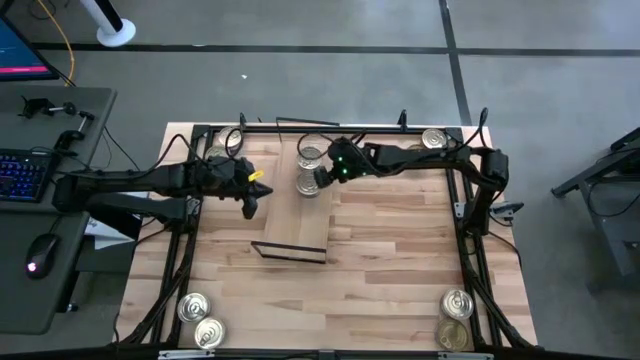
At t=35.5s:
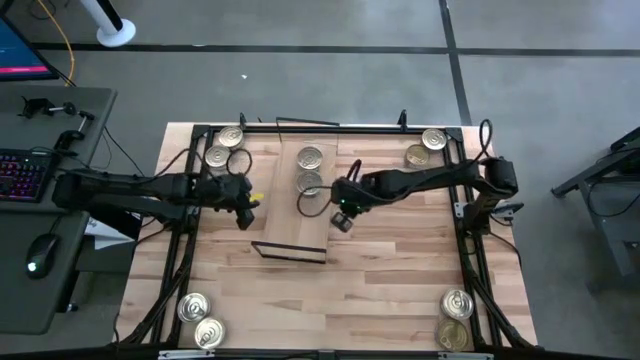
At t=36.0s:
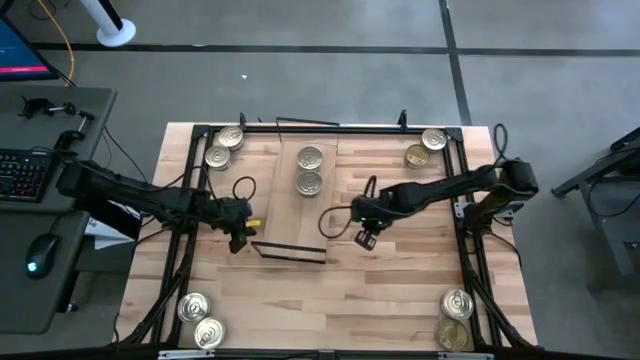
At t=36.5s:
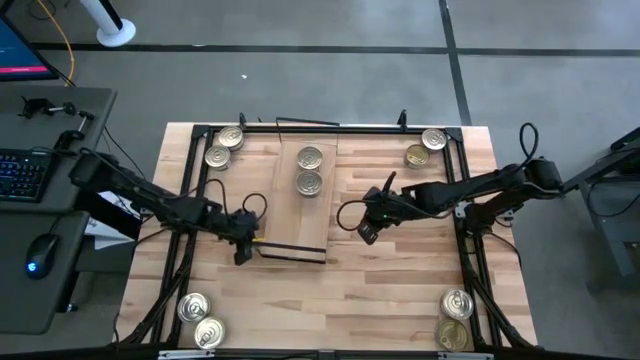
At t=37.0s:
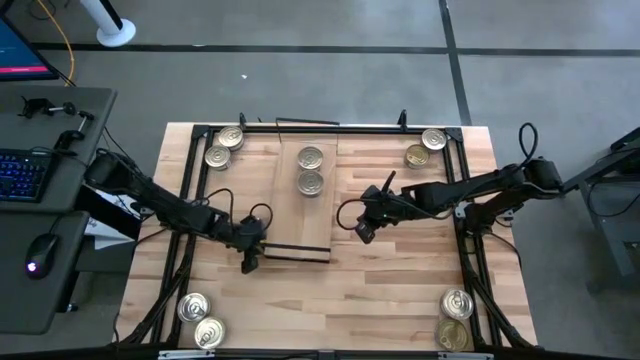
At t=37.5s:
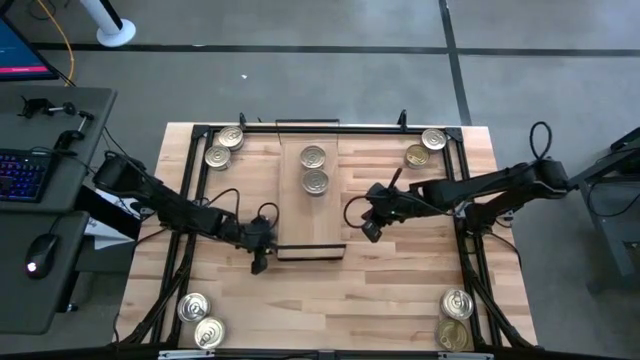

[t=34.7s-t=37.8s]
Task: Stack canned seafood by type on shelf
Adjust the shelf

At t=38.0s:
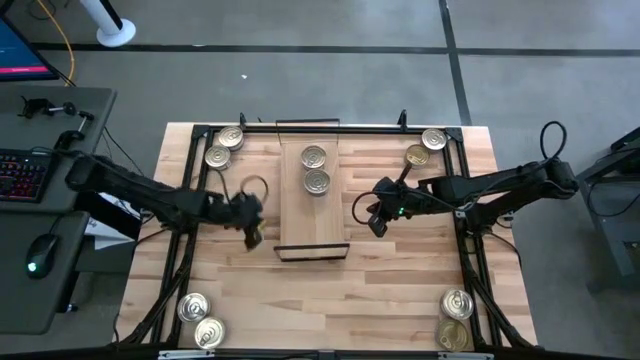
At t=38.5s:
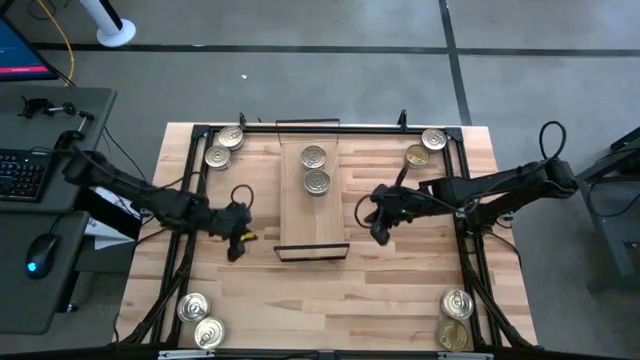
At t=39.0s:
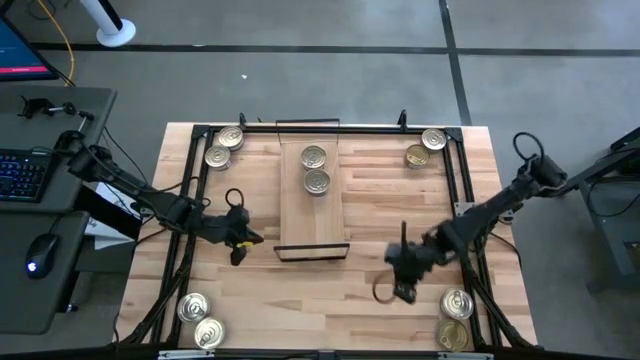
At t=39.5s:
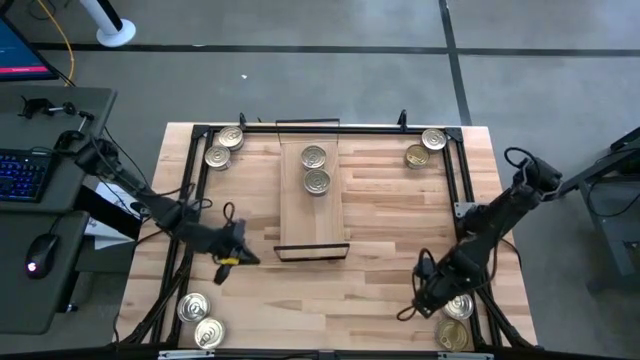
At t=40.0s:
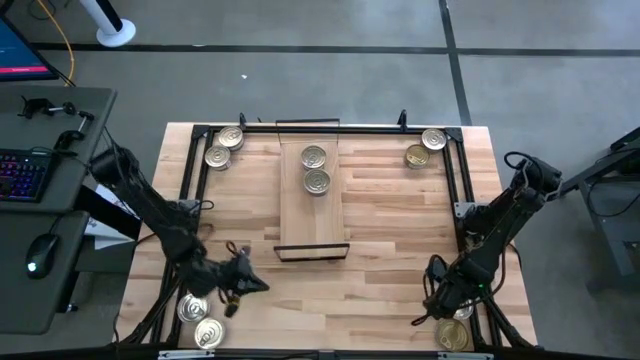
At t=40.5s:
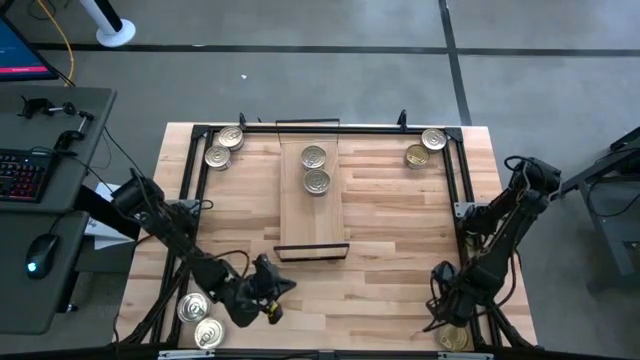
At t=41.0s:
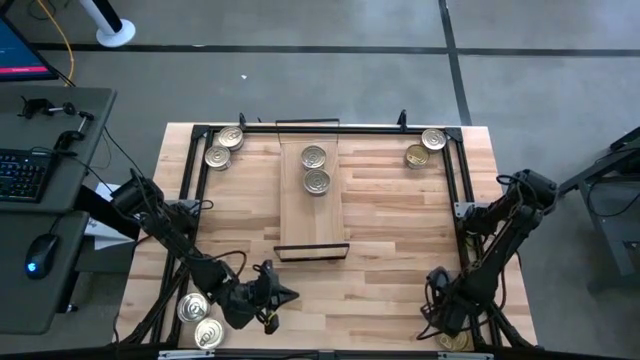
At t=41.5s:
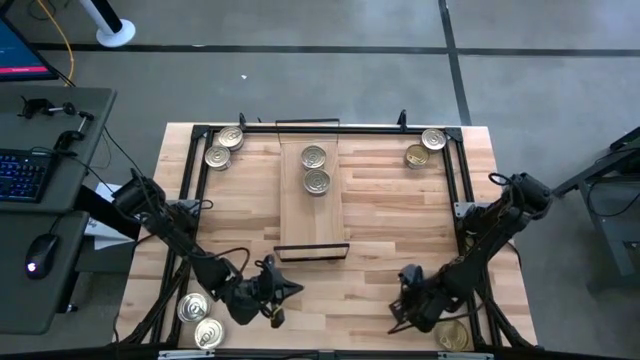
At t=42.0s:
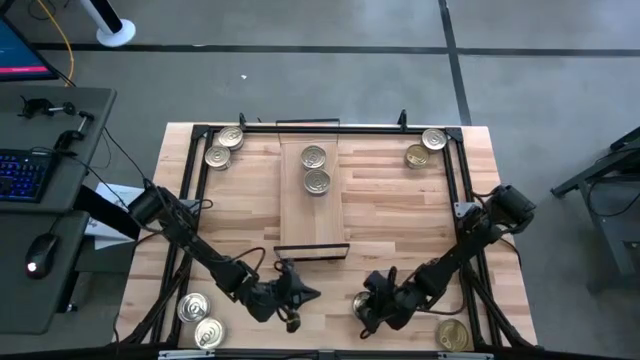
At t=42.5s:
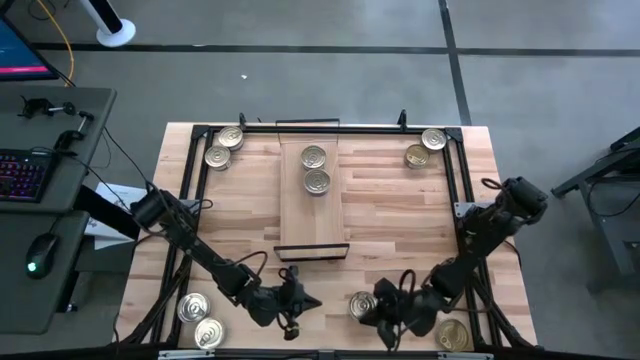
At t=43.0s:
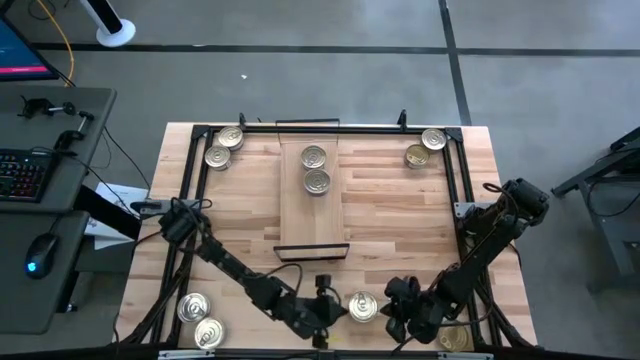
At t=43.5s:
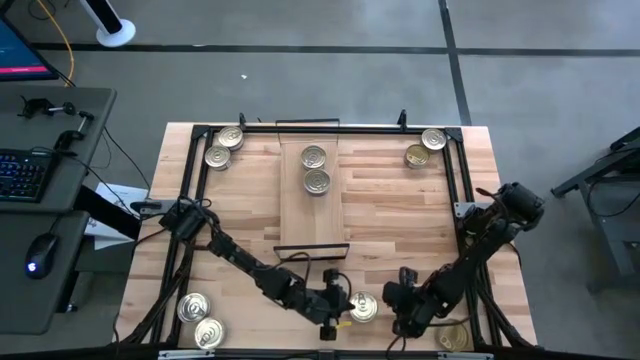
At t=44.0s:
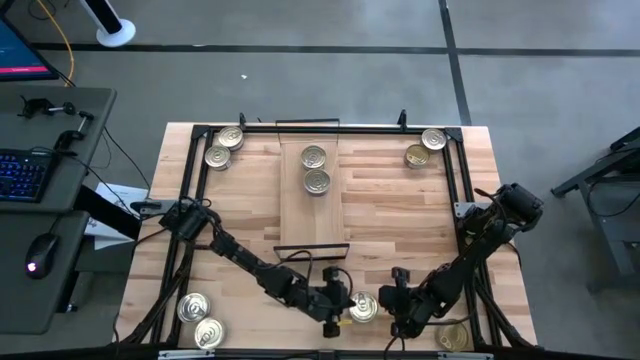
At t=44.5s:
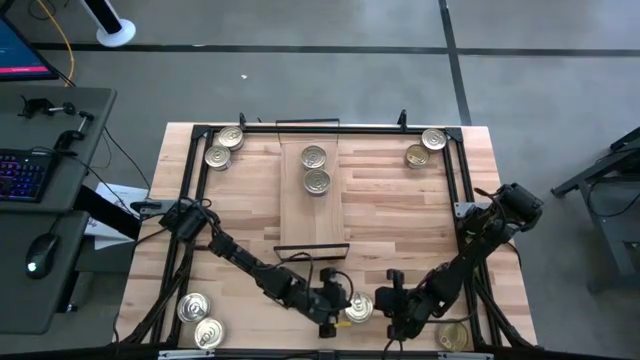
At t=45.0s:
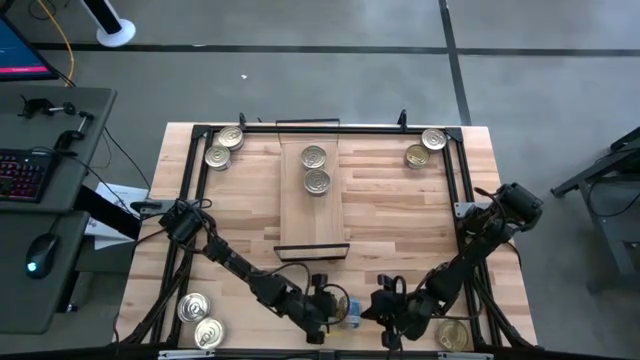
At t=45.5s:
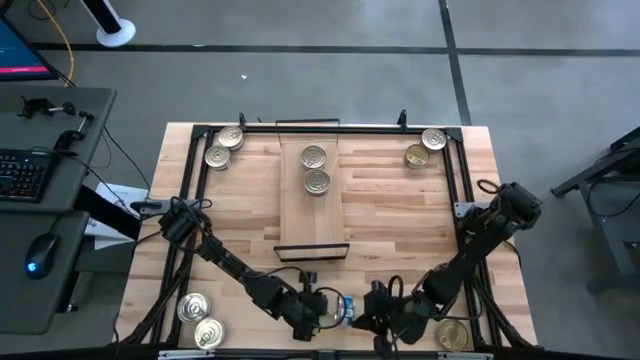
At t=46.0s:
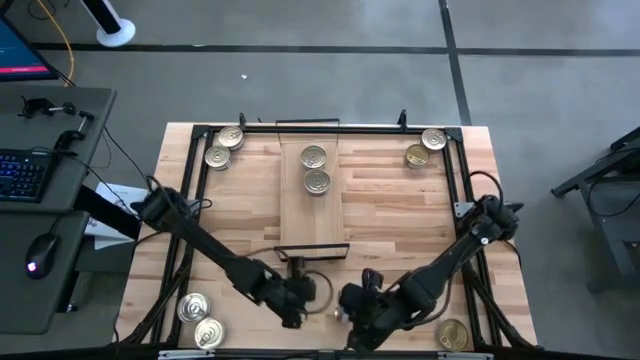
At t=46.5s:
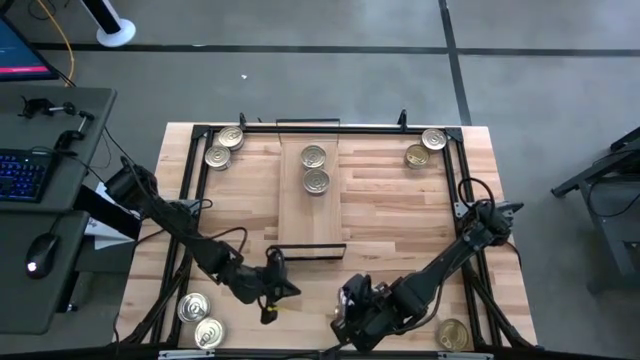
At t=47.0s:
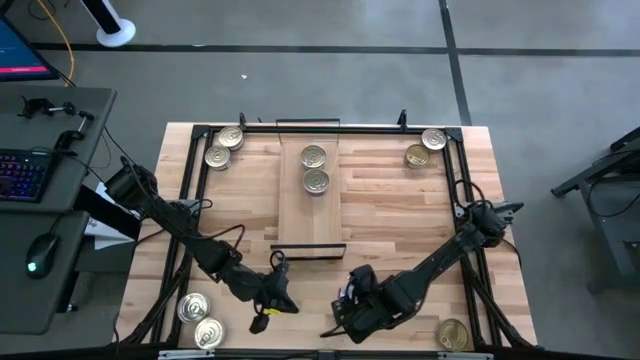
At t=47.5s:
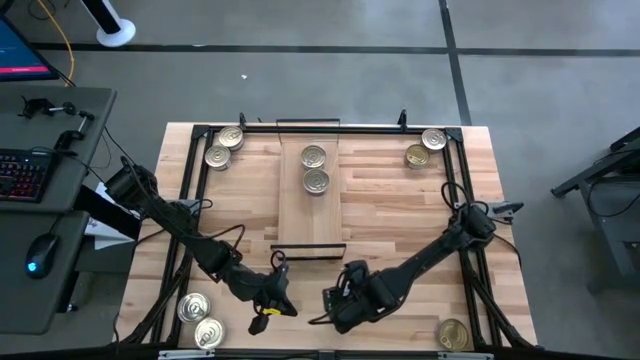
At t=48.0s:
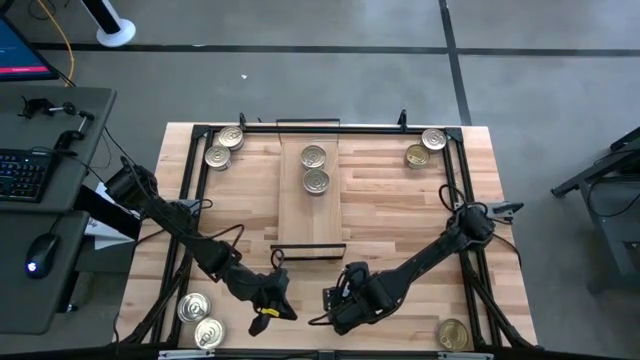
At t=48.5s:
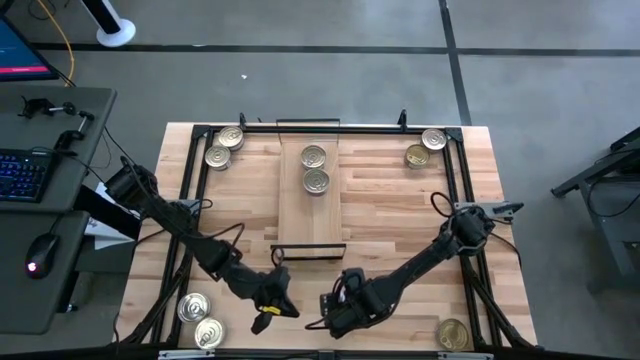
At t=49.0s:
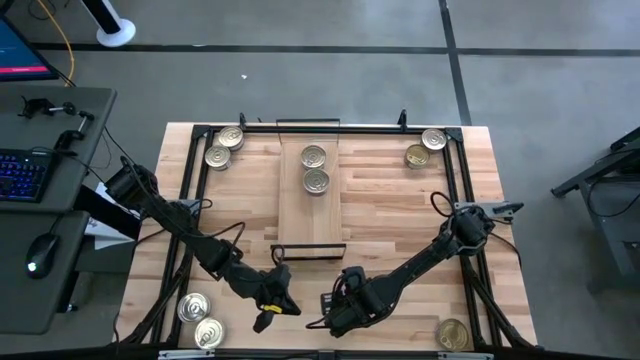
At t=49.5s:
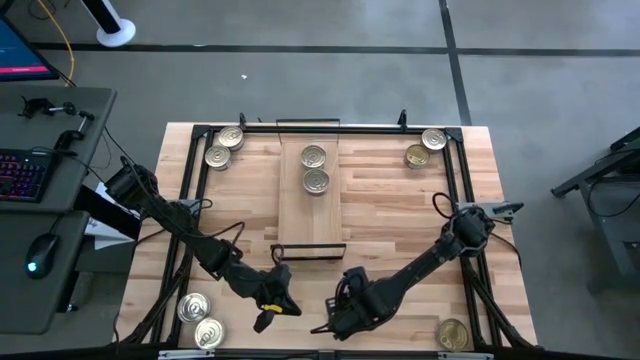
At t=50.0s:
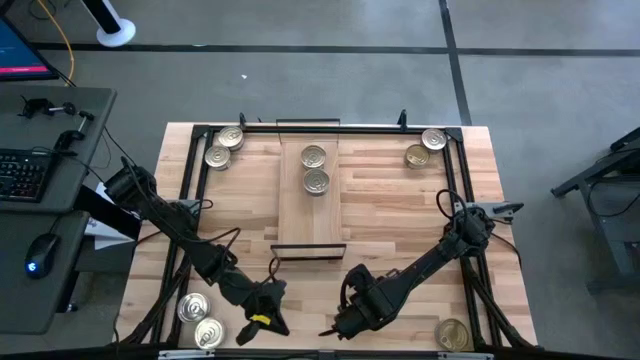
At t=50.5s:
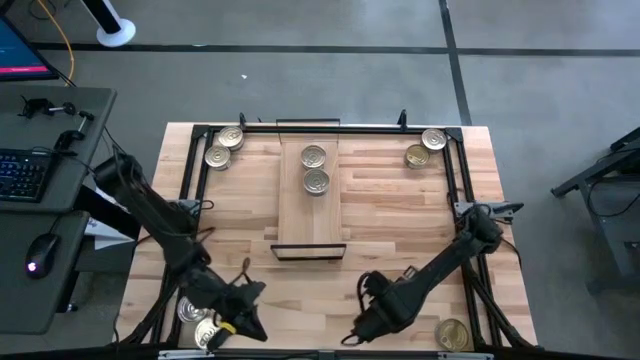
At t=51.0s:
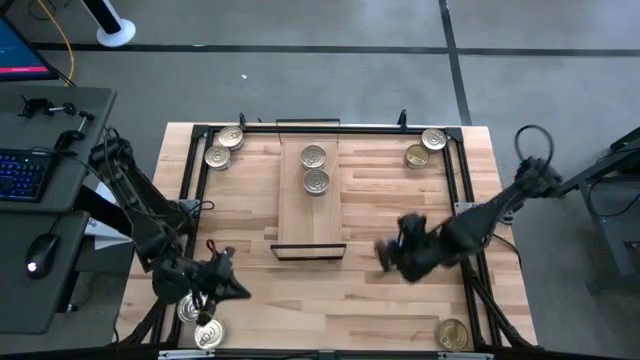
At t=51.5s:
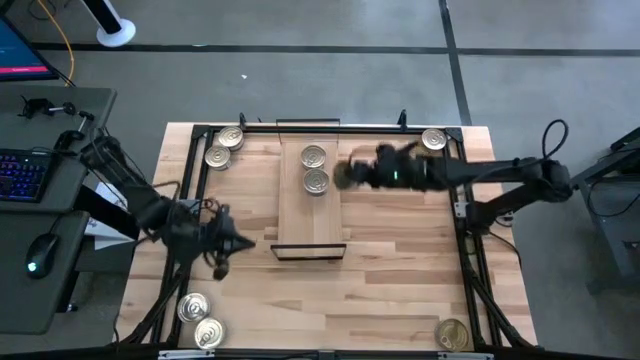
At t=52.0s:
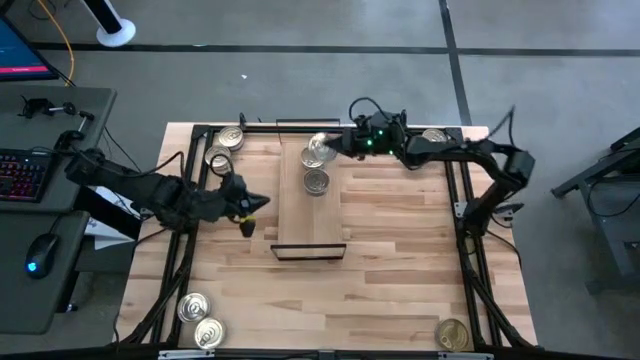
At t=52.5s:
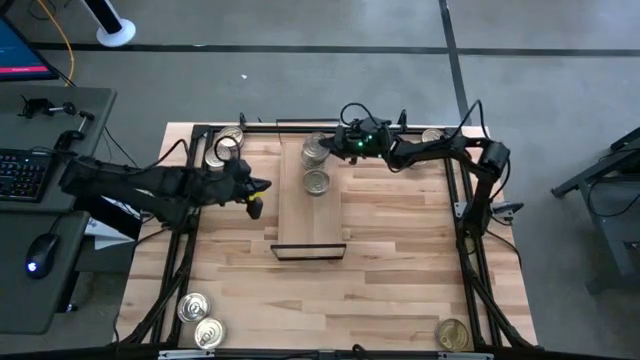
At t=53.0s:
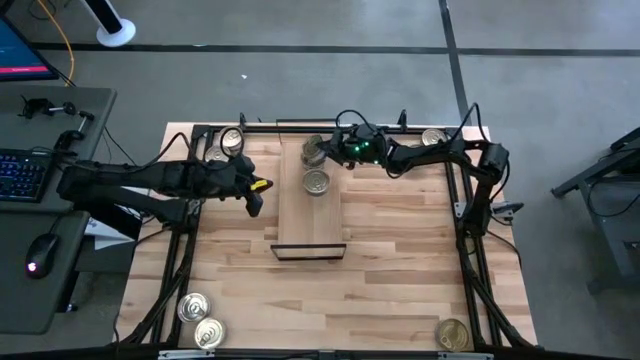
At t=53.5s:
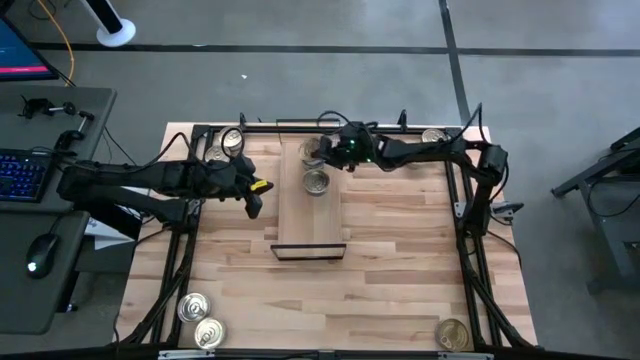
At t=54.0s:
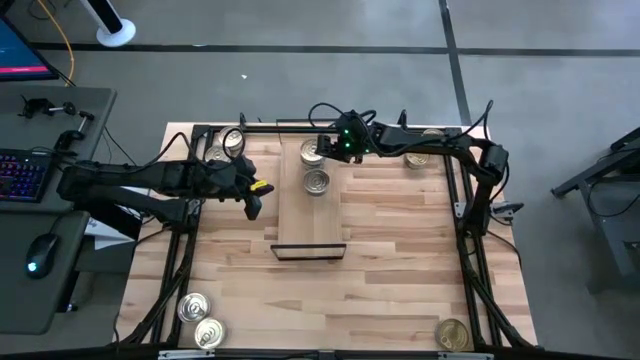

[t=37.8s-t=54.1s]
Stack the blue pink tuna can on top of the other blue pink tuna can on the shelf

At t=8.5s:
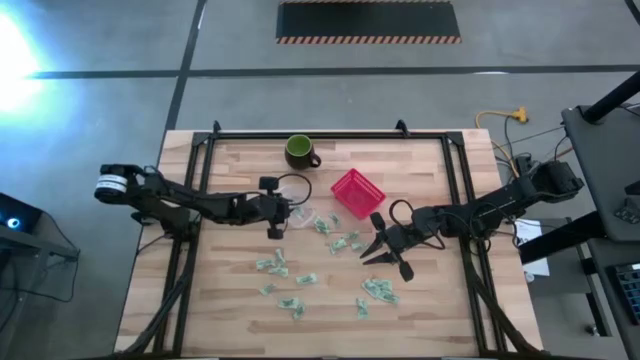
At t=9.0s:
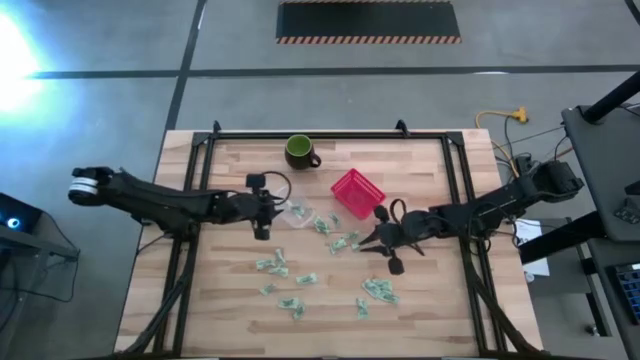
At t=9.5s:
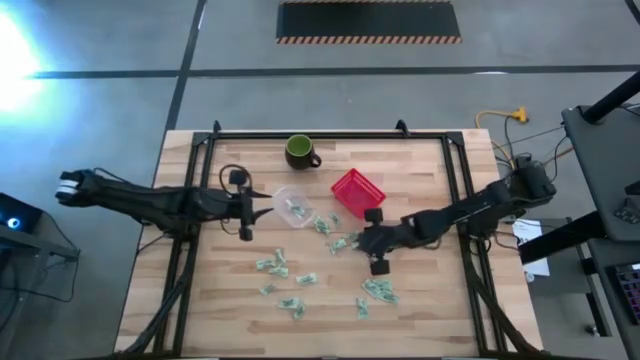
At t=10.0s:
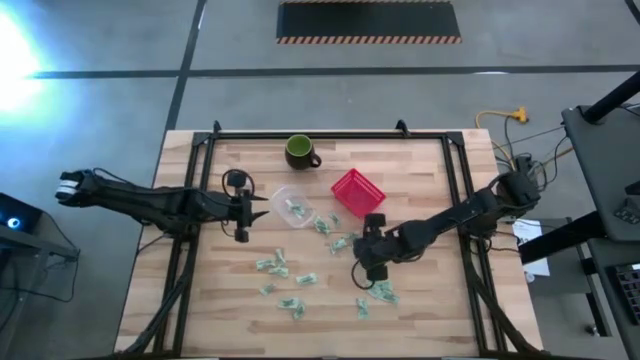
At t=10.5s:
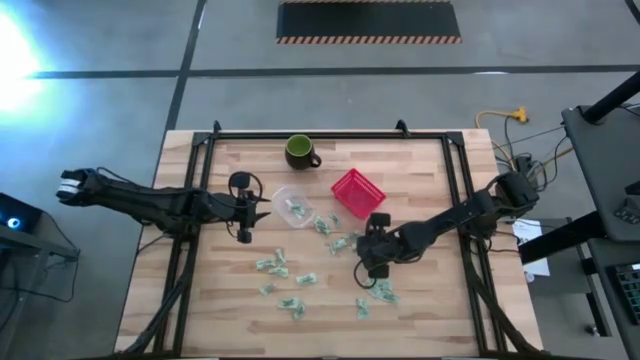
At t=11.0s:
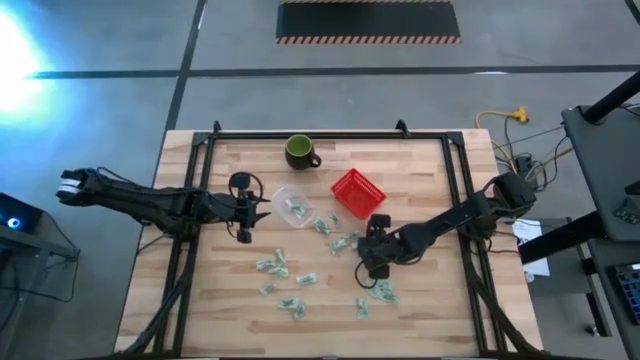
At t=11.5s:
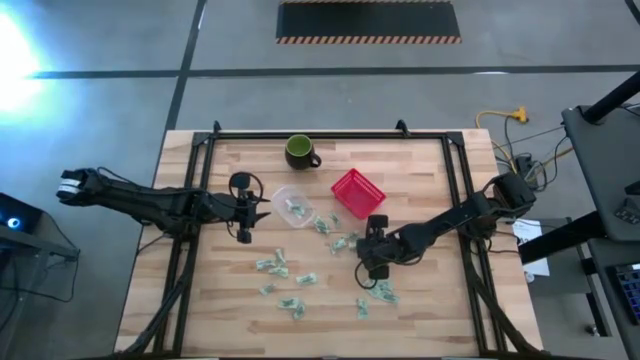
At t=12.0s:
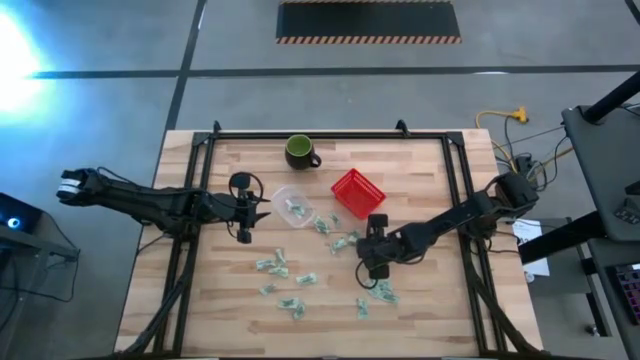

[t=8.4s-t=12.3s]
Task: Pick and place items into bin
Put the stevia packet into the red bin
